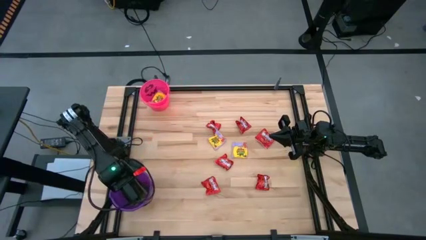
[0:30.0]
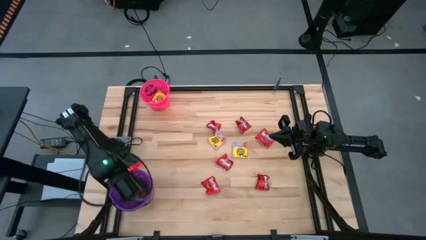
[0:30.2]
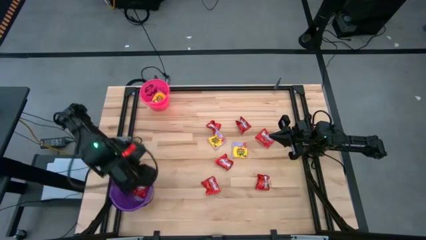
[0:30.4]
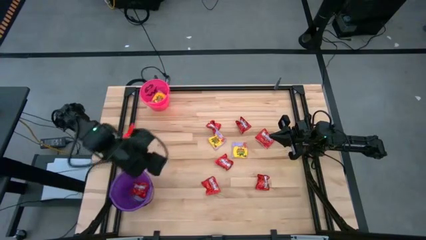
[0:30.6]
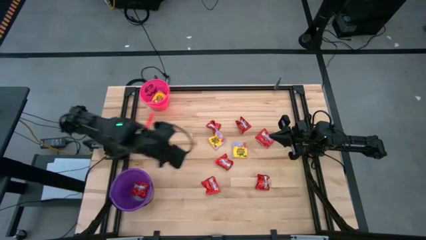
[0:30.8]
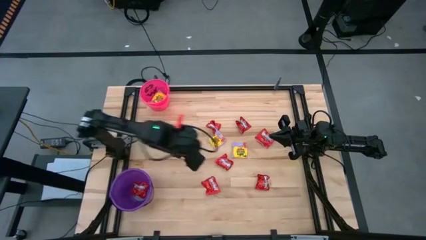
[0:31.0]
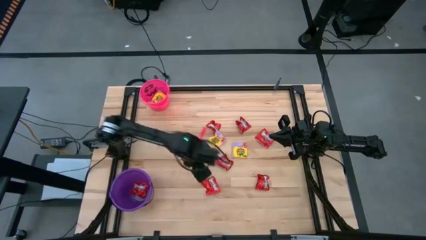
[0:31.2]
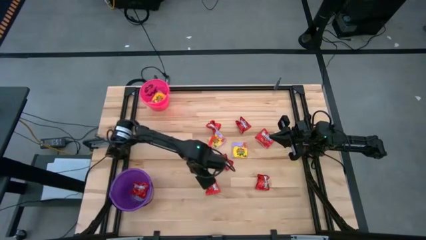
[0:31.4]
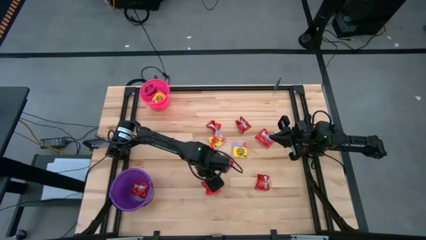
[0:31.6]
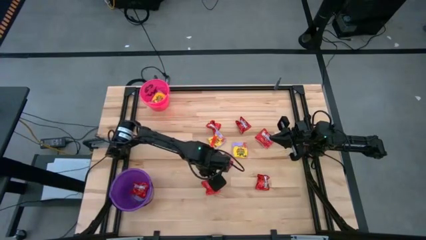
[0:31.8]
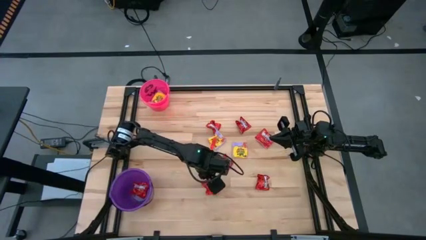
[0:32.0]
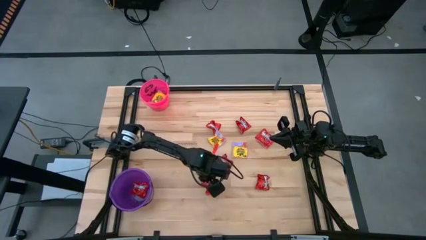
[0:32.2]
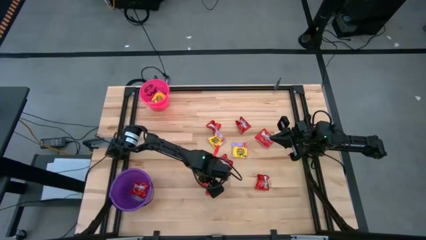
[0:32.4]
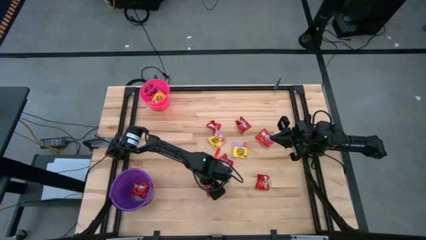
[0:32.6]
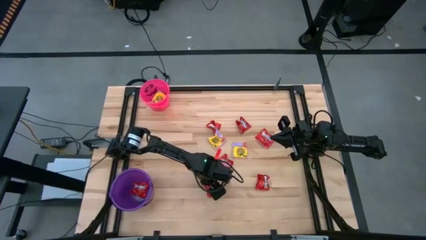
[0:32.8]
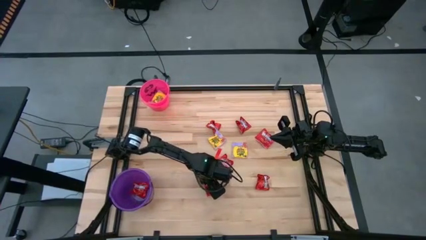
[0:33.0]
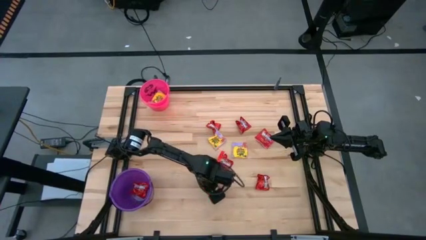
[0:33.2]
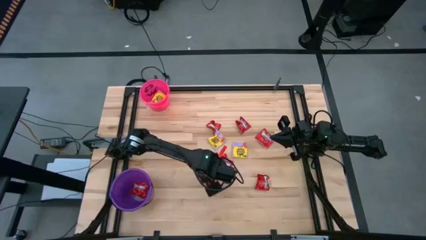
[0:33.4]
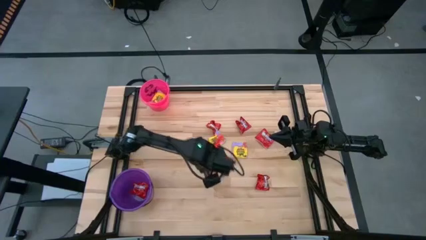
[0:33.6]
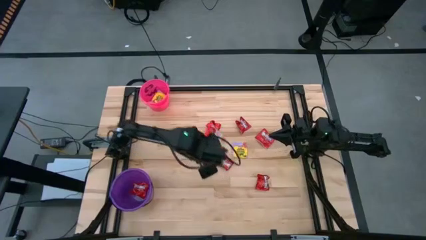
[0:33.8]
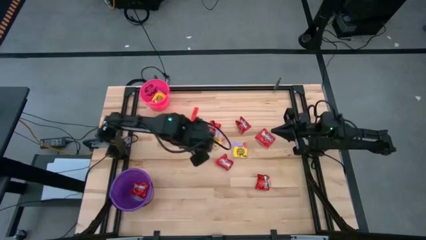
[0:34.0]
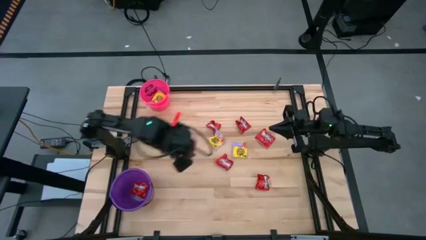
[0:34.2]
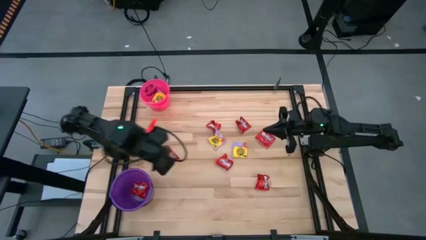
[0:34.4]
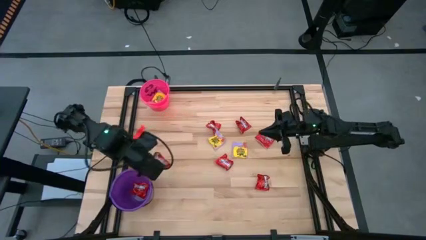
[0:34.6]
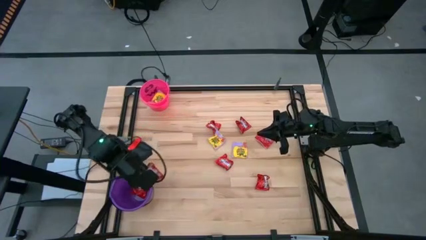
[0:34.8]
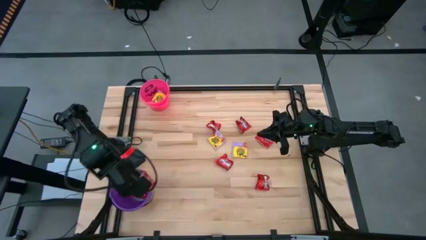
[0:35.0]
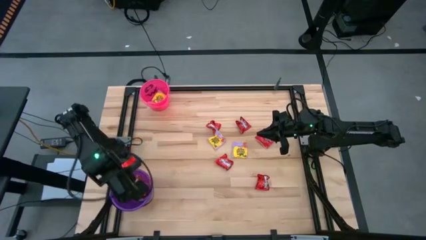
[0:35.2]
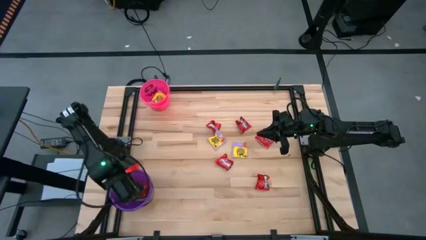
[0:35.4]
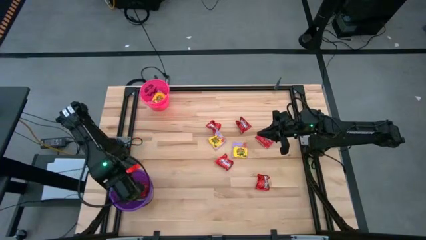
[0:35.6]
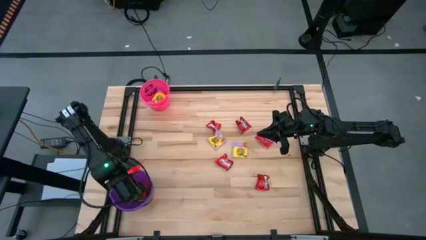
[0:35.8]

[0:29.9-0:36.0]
Task: Sort candy by brand, put in halloween buckets
Put the red candy into the violet bucket

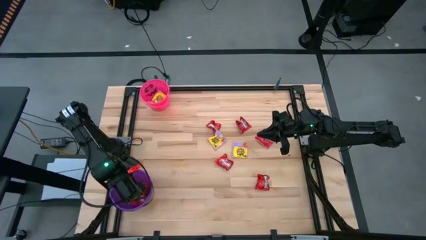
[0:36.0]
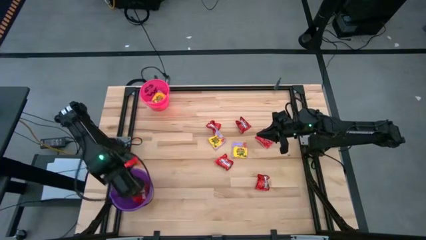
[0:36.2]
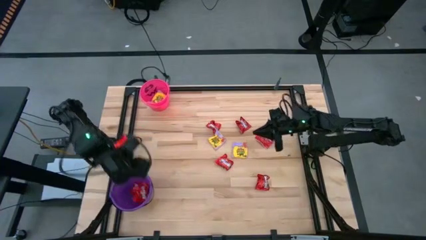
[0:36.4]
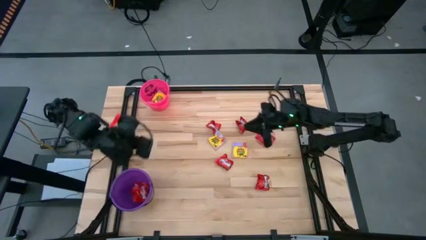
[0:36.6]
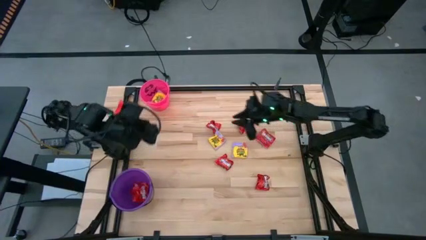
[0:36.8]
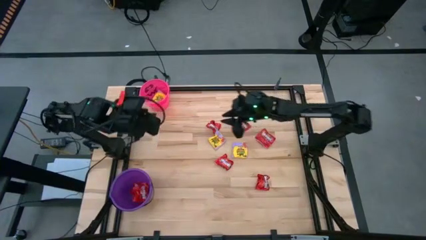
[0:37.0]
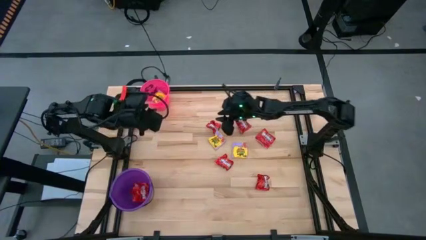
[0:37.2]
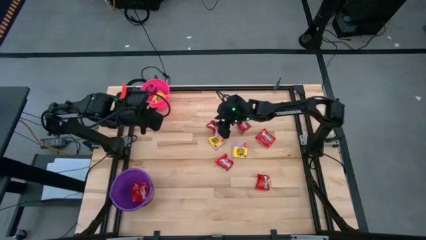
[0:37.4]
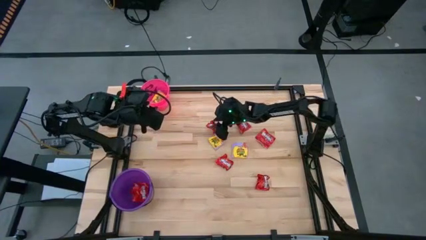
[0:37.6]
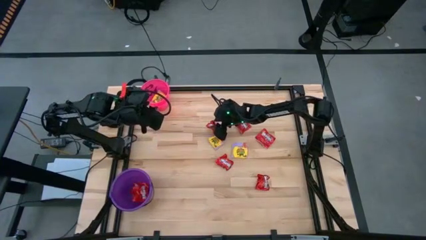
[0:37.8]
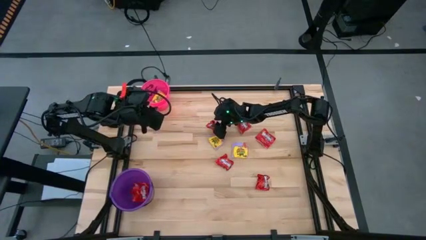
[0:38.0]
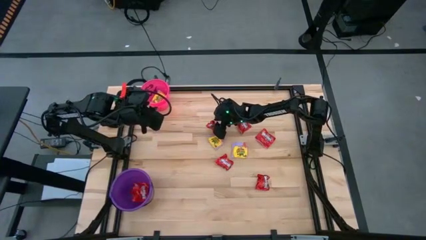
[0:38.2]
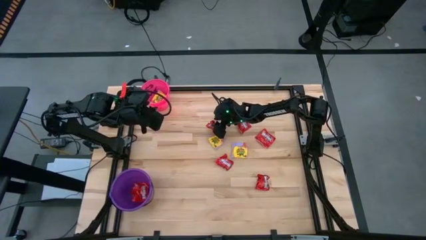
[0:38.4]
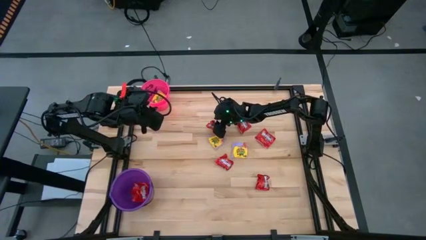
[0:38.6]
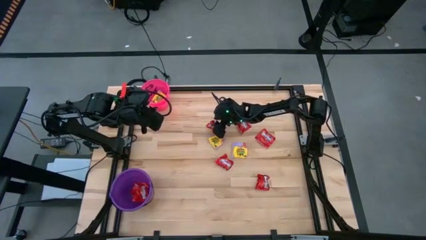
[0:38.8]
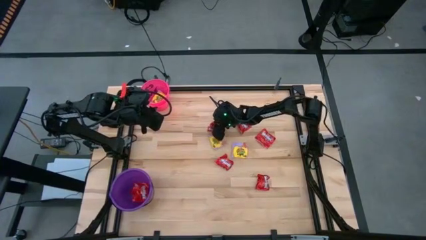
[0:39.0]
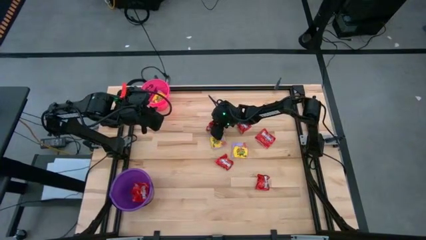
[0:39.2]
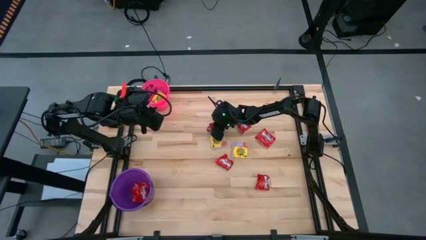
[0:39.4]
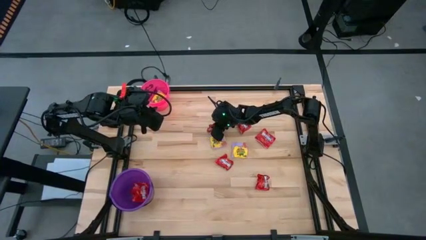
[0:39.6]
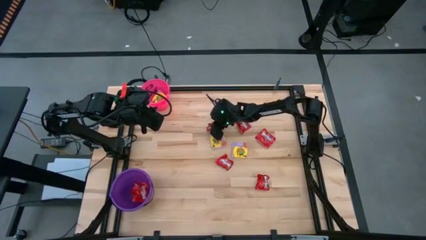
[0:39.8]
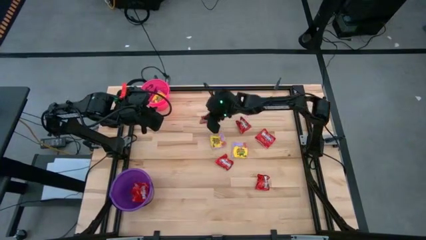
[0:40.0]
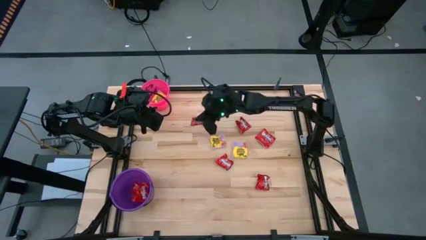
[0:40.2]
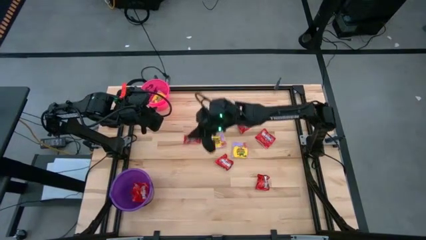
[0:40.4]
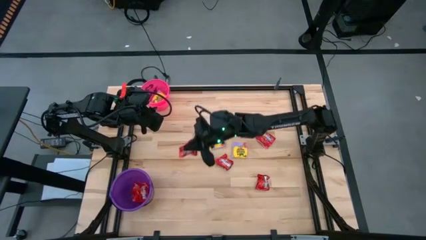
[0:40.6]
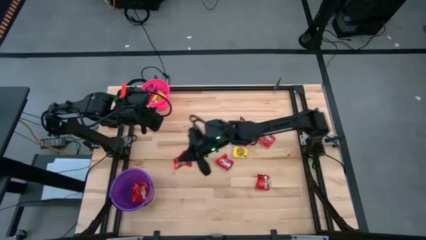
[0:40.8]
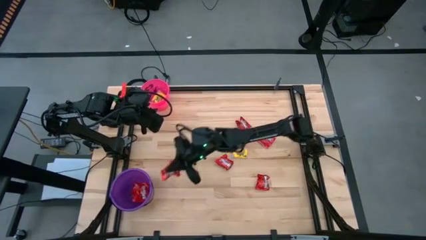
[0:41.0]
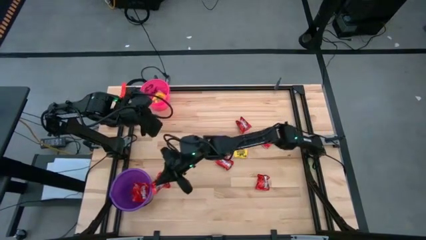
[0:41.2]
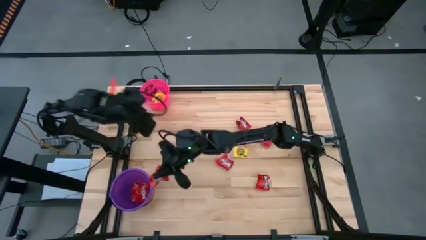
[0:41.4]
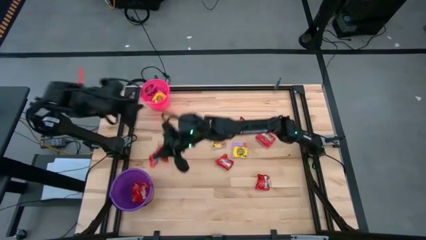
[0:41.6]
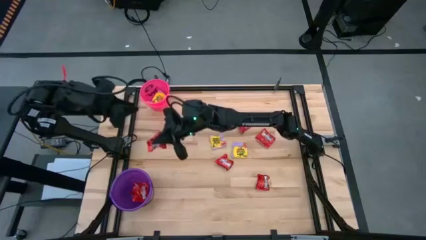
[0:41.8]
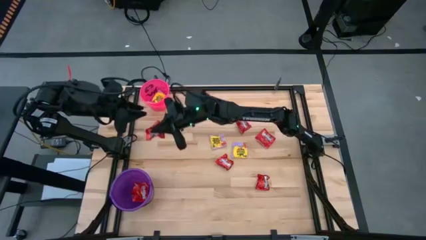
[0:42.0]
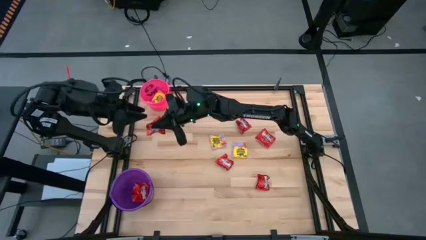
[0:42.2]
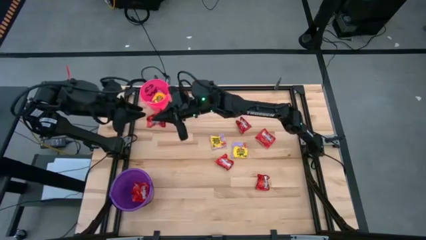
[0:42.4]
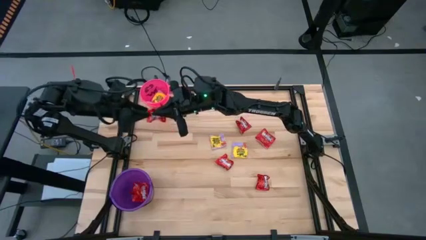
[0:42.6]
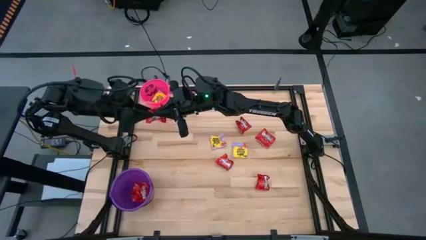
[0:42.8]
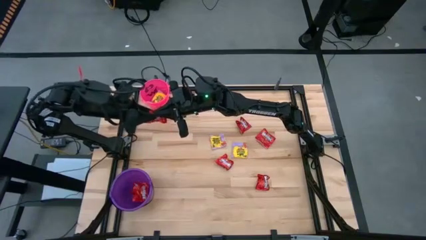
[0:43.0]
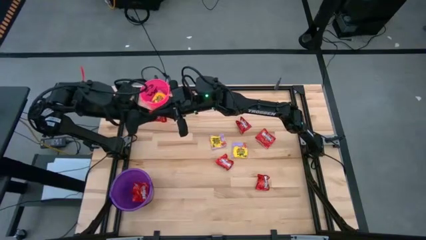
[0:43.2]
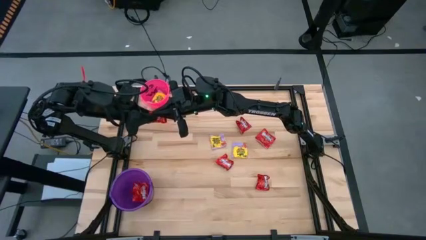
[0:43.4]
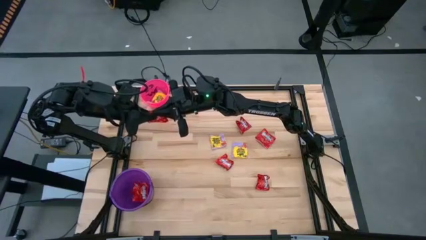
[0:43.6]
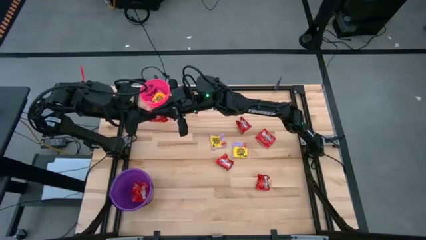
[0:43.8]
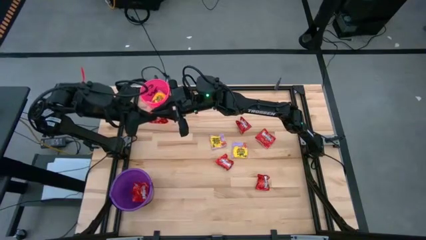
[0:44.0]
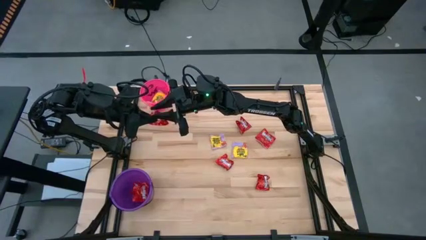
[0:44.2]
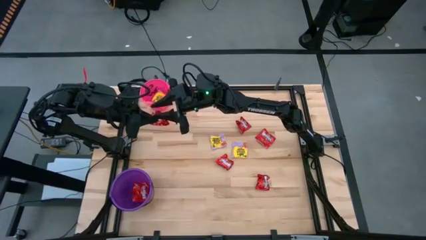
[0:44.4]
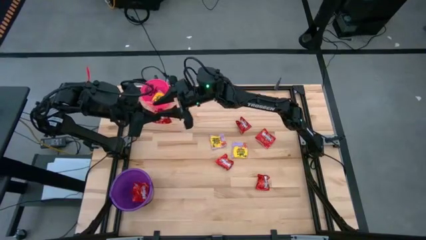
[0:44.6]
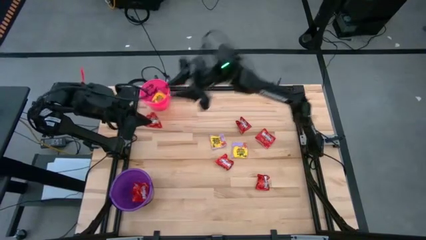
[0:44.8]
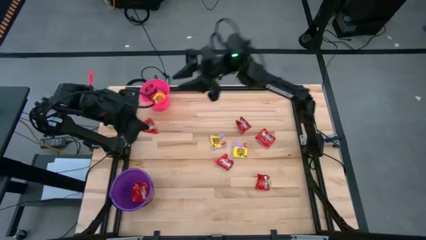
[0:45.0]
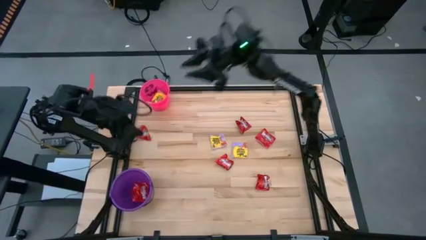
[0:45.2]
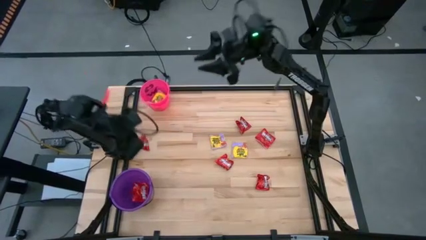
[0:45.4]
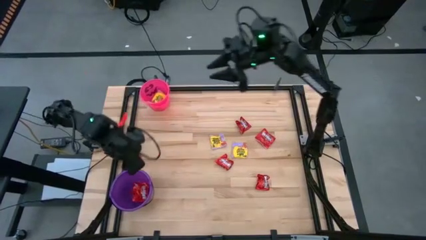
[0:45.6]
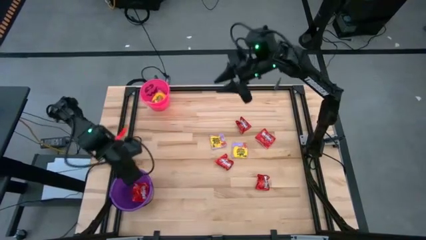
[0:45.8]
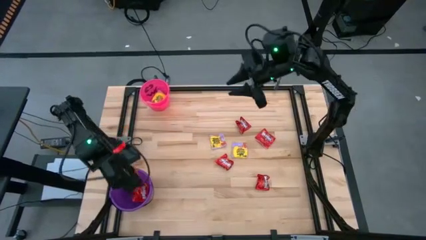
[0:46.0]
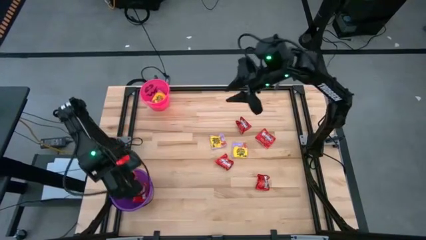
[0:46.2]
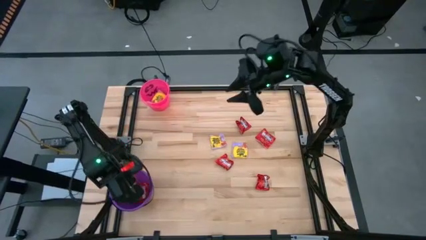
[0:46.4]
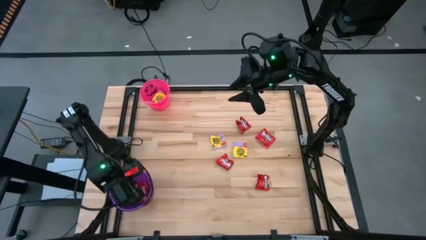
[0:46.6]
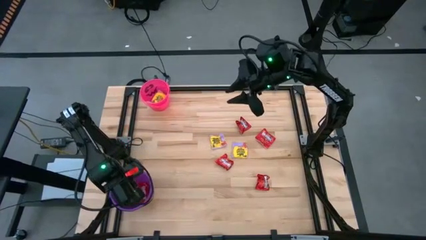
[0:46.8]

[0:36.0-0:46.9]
Put the red candy into the violet bucket
